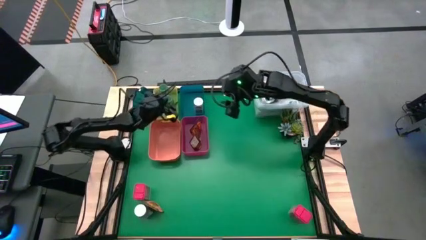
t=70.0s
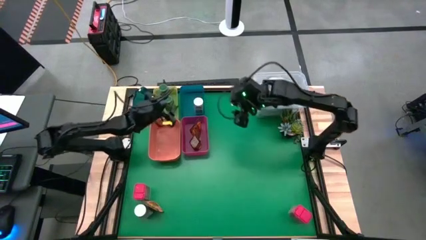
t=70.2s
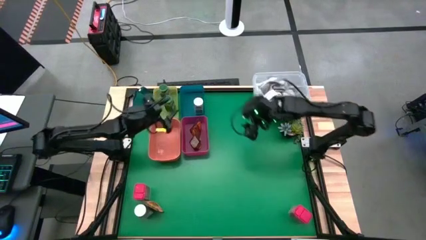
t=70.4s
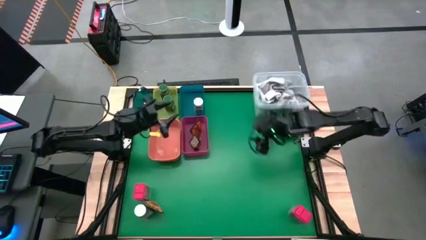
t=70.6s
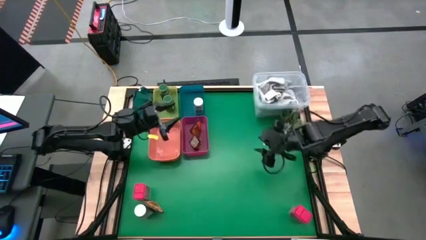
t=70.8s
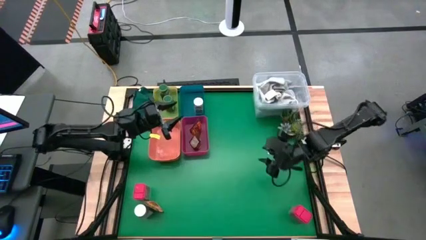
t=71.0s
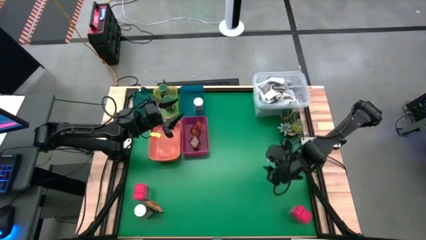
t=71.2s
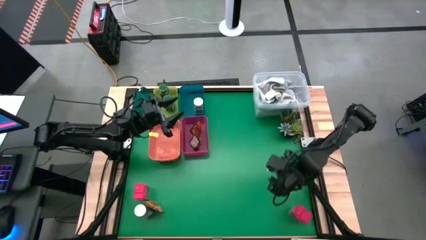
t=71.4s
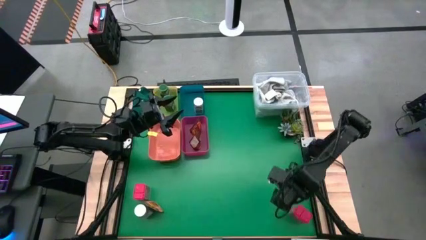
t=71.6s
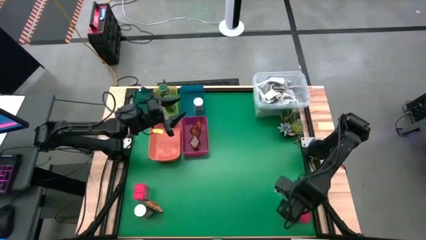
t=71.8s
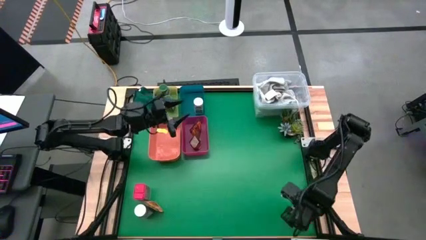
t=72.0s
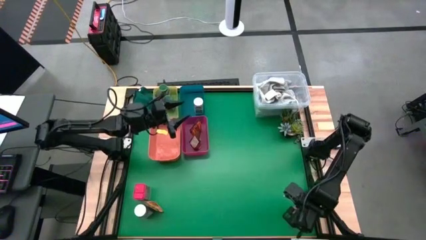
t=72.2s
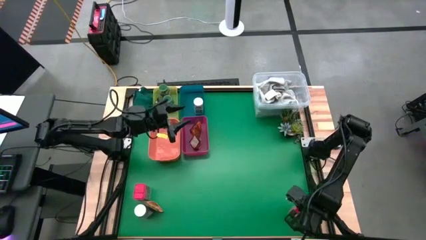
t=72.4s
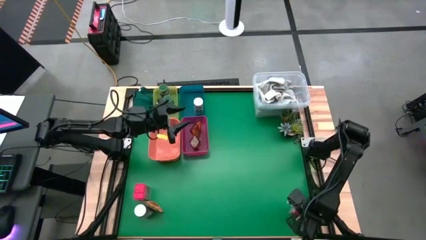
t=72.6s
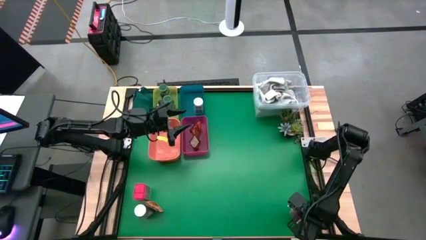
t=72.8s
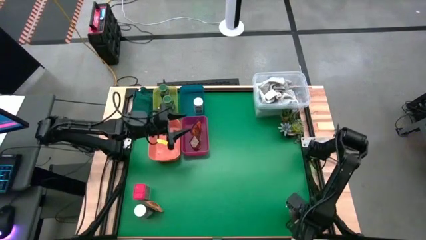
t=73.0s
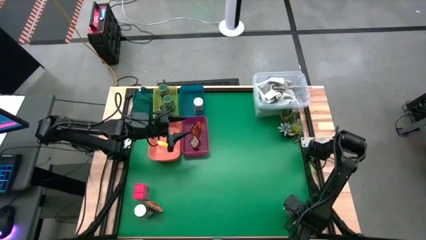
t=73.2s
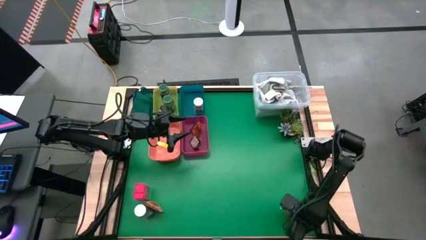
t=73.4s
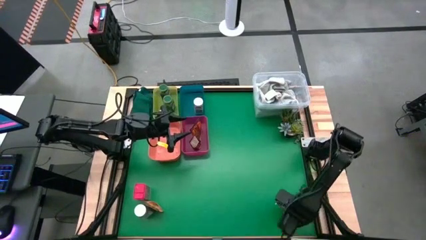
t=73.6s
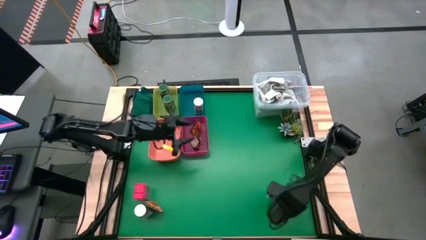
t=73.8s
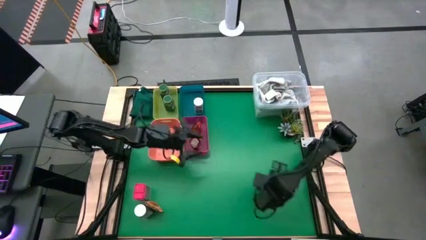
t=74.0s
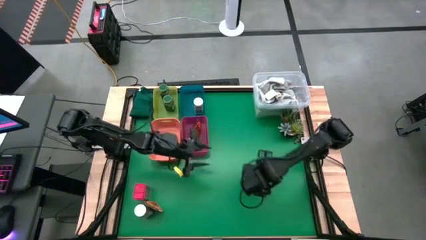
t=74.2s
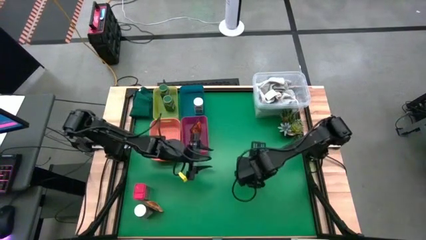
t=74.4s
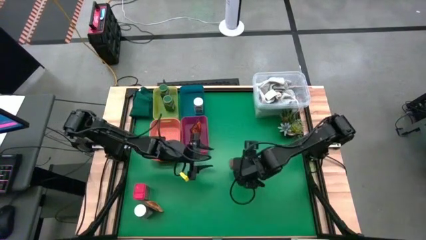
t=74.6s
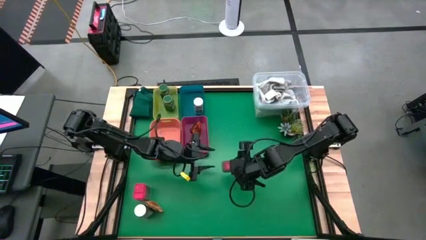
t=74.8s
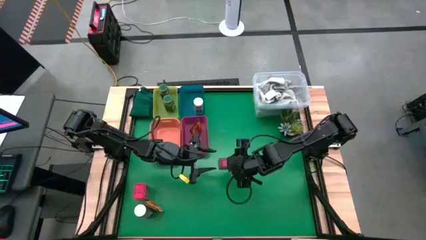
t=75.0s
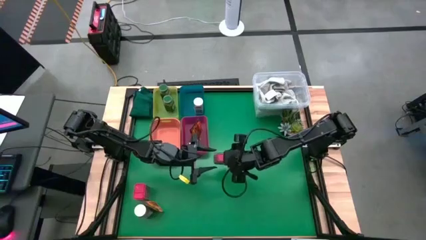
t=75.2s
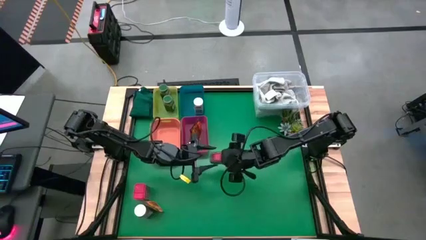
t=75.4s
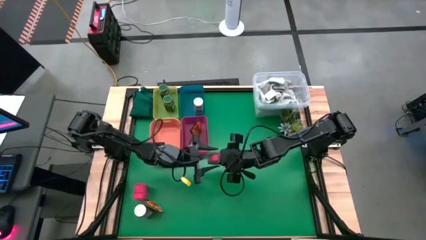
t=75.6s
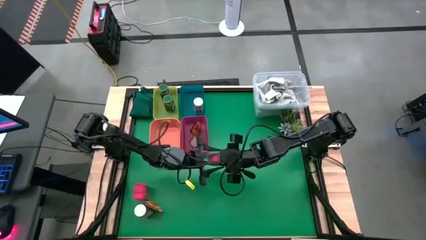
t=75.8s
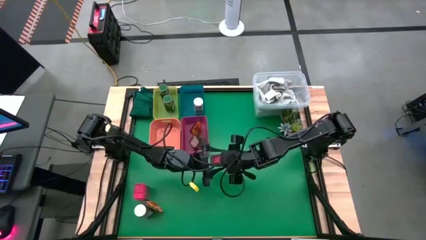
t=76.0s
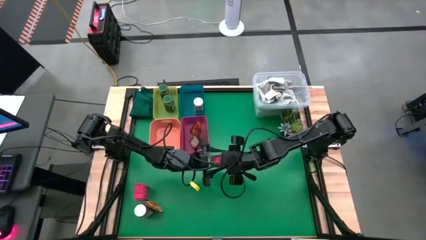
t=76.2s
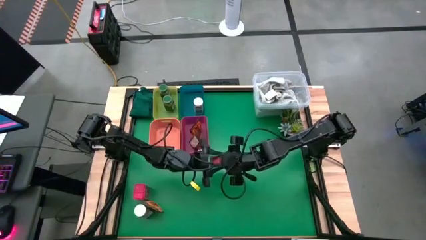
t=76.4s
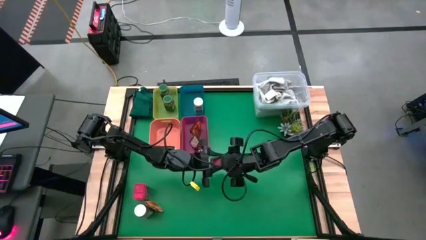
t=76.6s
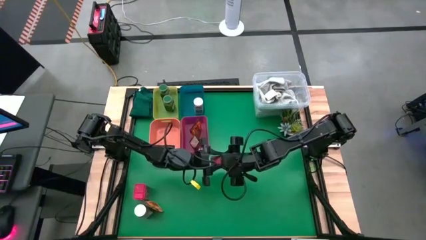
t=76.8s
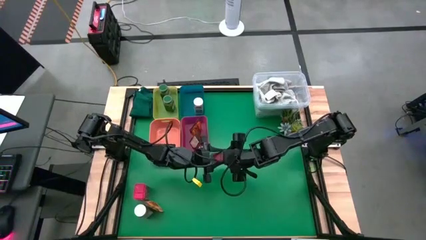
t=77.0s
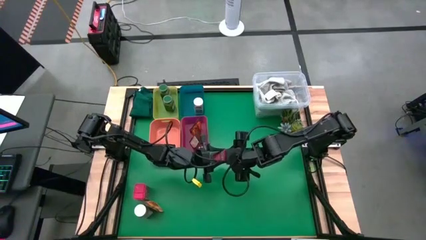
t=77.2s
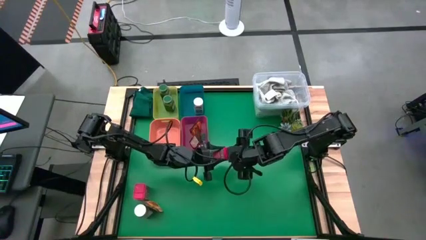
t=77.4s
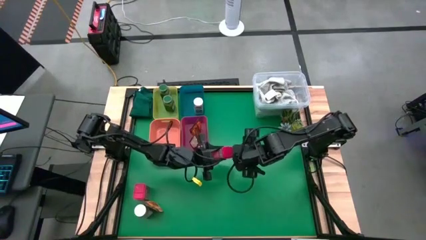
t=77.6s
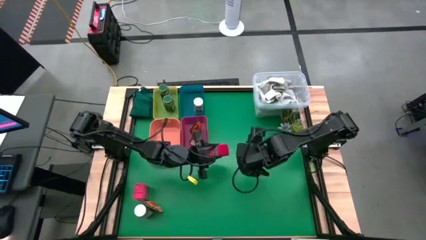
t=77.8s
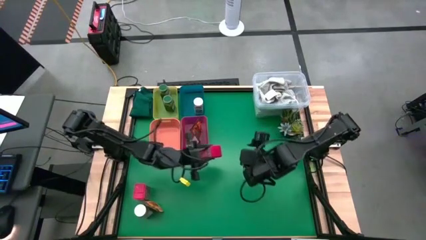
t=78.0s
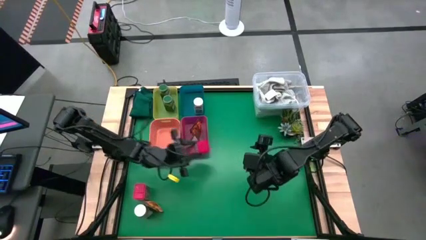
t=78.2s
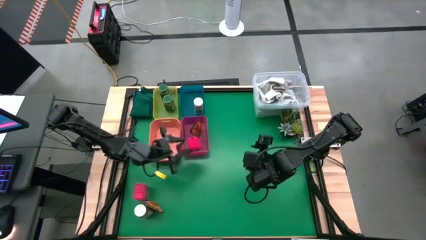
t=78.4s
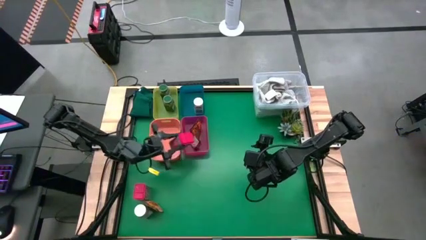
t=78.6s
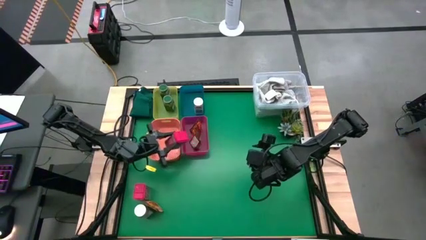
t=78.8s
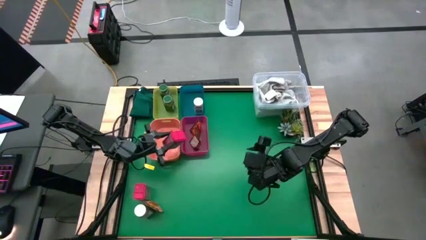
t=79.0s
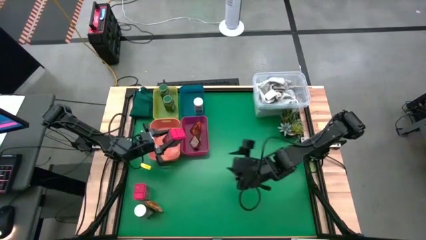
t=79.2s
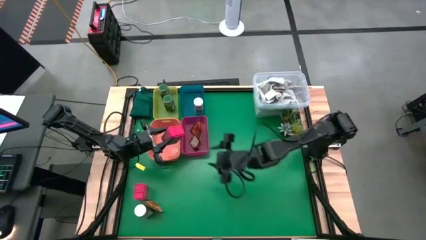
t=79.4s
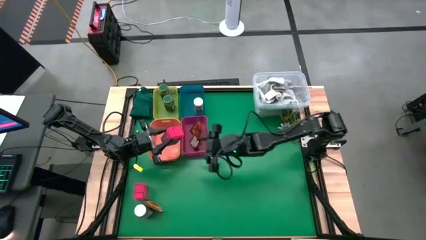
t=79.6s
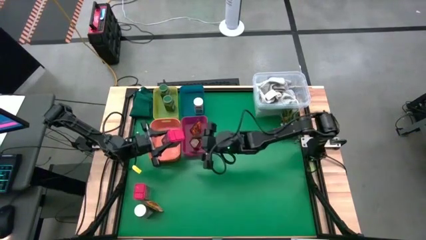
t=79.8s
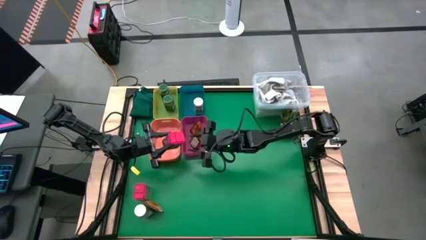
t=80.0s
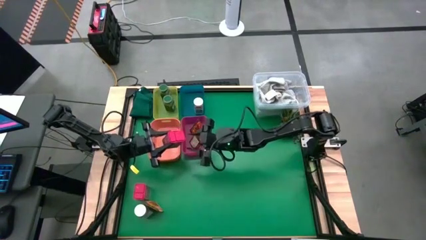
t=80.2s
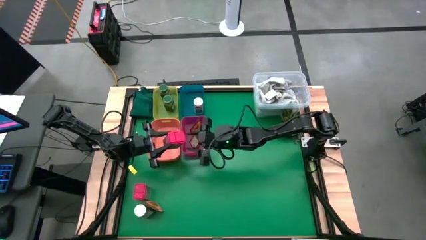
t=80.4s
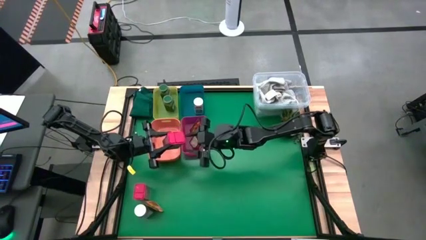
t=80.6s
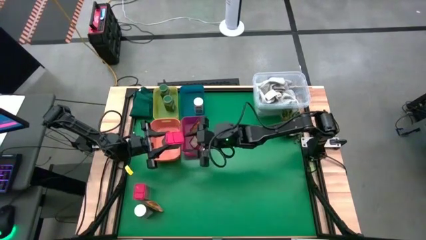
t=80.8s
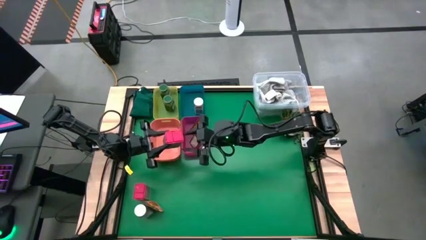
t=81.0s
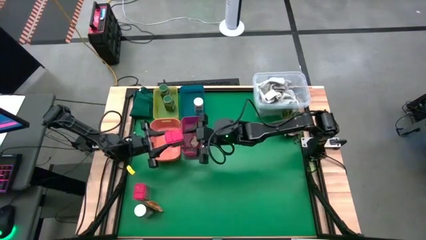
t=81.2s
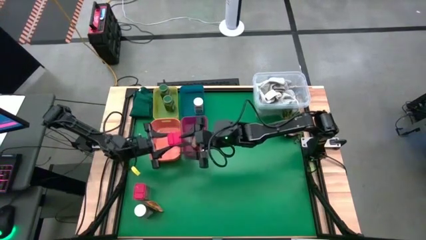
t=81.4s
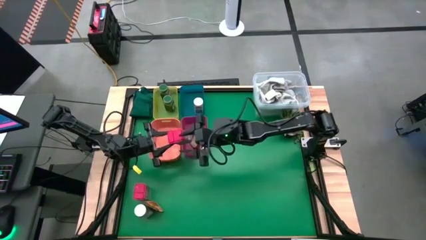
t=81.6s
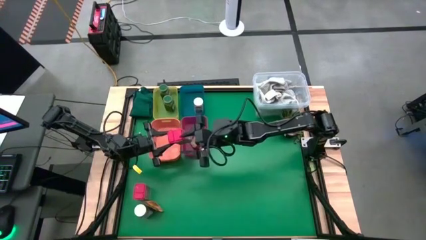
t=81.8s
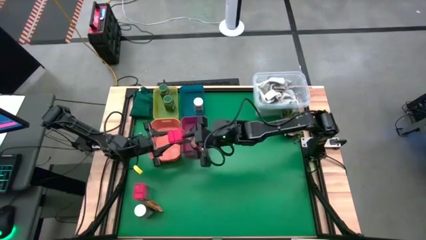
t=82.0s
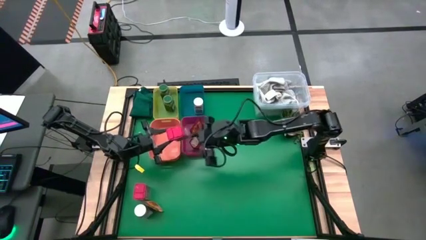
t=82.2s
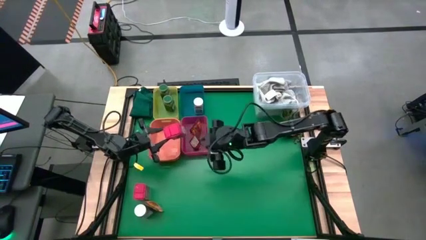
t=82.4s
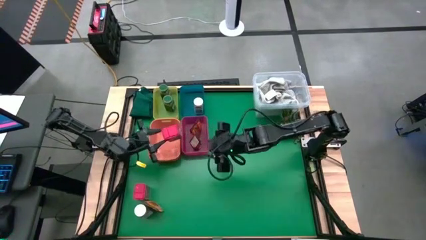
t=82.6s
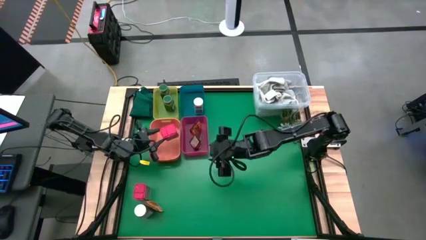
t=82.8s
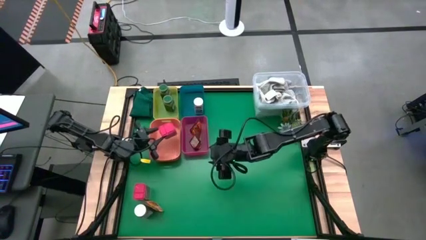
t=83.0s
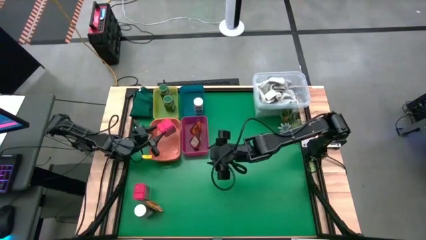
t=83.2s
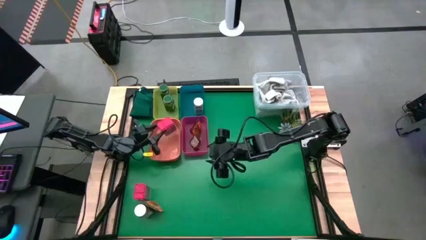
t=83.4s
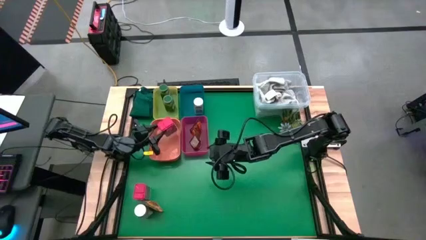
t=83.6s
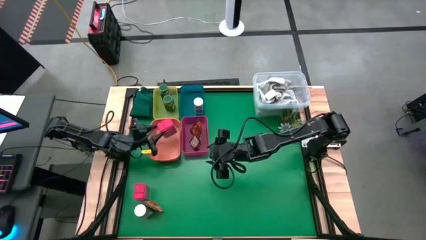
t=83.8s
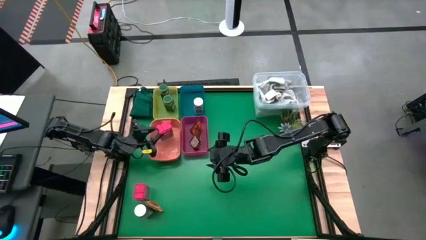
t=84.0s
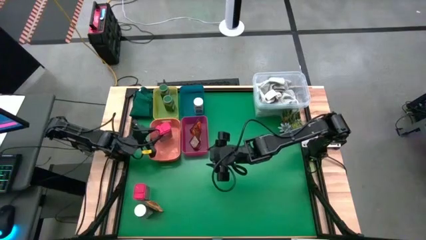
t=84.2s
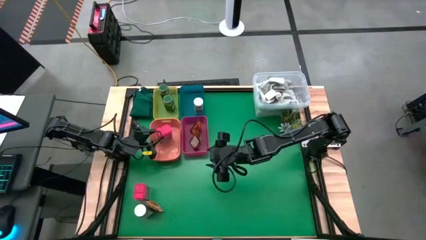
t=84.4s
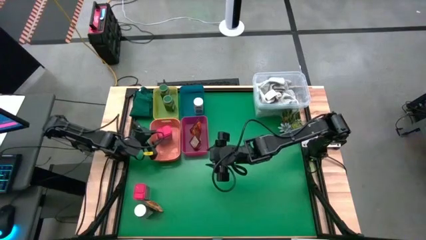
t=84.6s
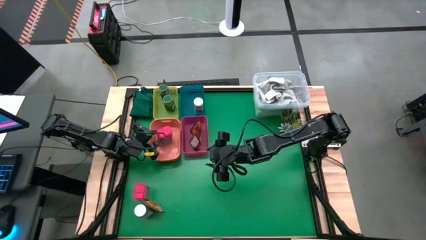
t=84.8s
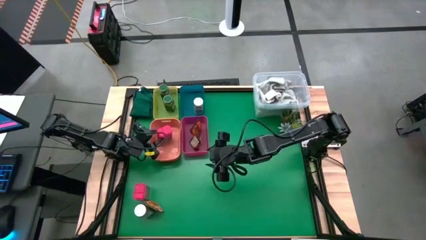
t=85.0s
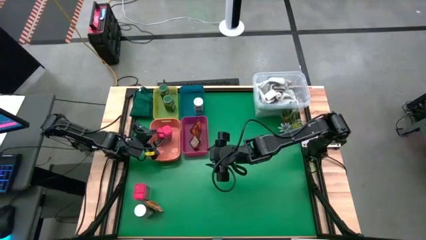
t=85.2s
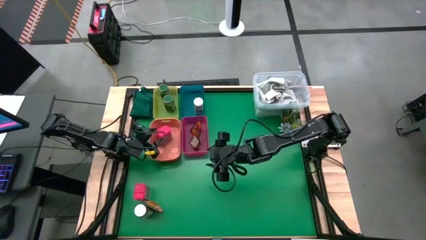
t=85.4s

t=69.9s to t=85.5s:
Task: Sort spices by type
Put the right red seasoning can into the orange bin
